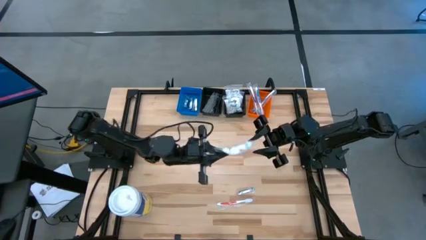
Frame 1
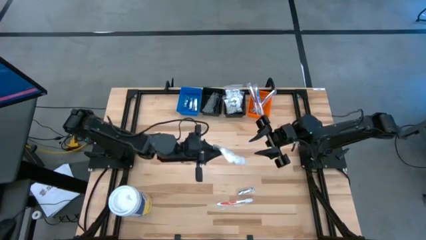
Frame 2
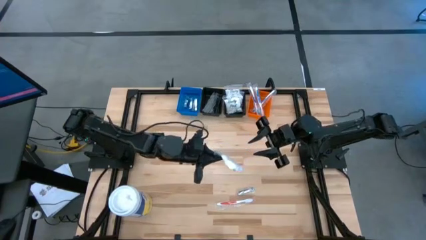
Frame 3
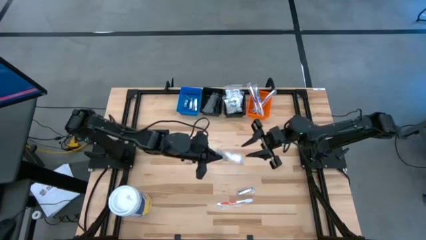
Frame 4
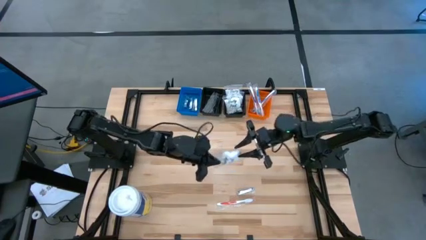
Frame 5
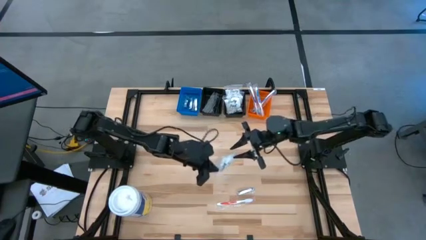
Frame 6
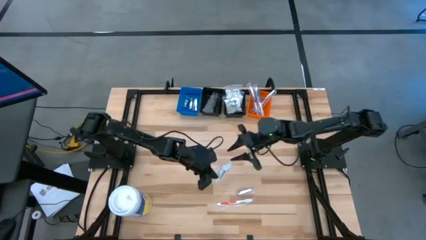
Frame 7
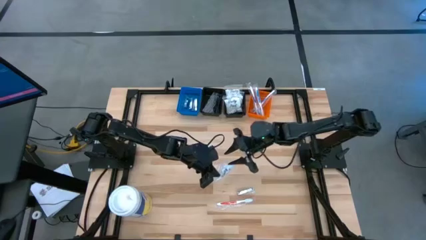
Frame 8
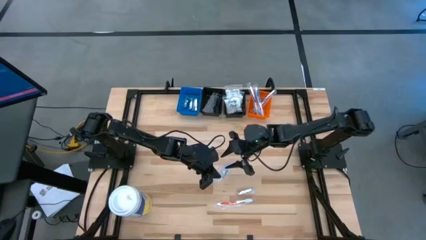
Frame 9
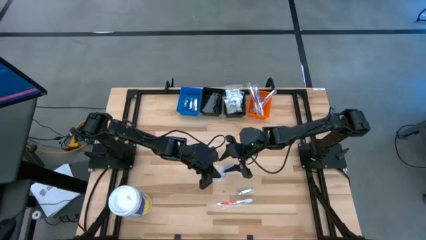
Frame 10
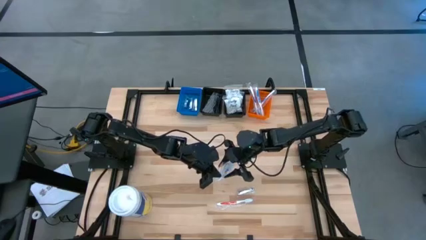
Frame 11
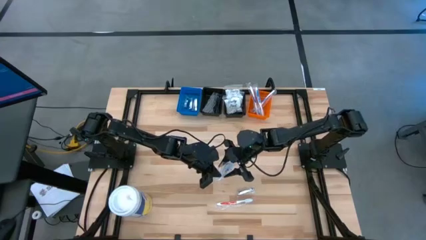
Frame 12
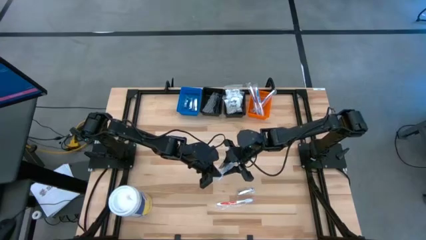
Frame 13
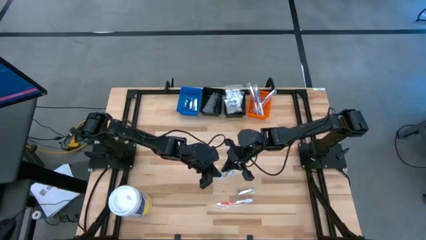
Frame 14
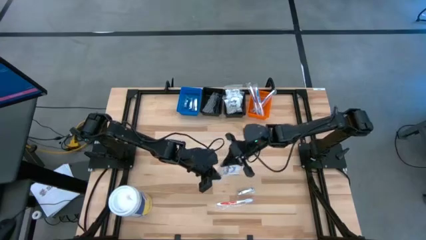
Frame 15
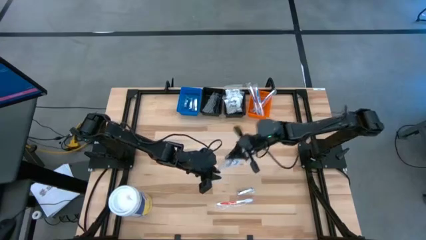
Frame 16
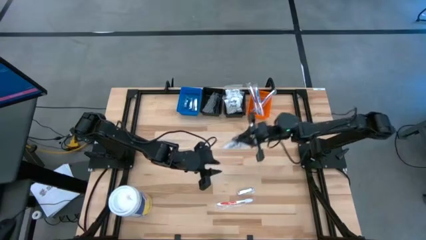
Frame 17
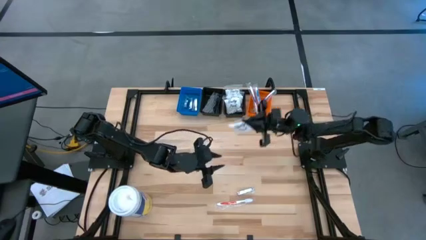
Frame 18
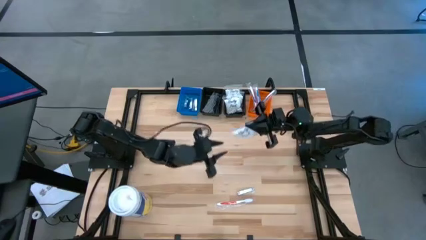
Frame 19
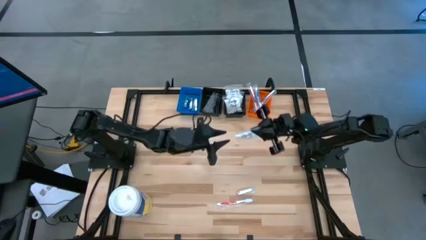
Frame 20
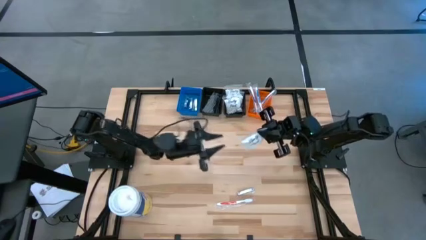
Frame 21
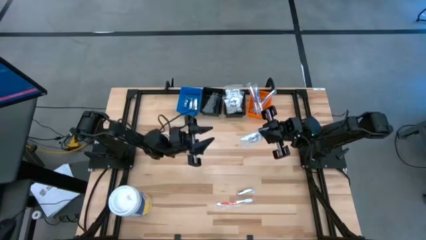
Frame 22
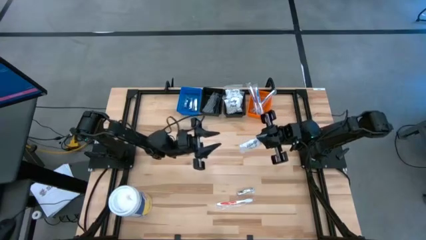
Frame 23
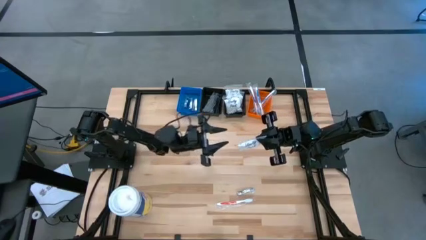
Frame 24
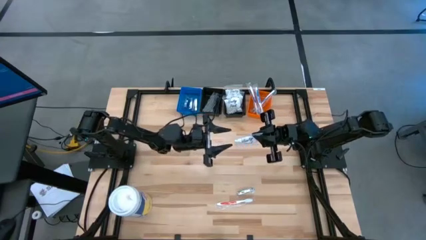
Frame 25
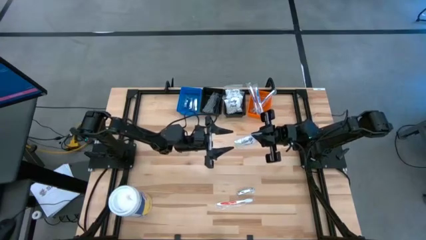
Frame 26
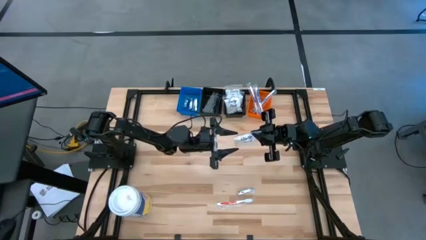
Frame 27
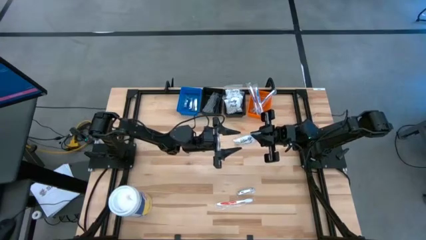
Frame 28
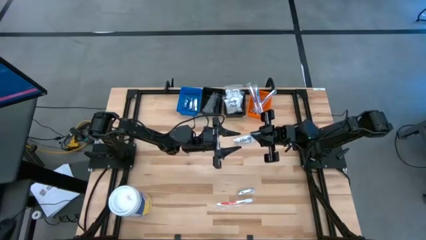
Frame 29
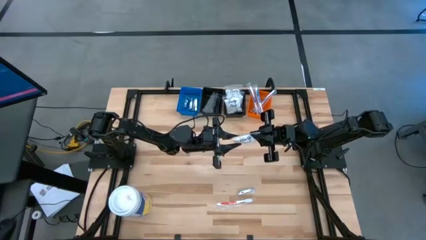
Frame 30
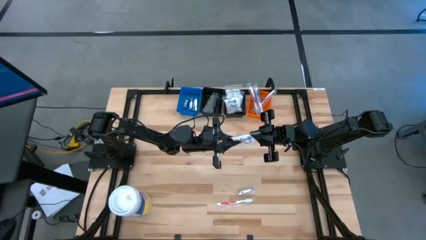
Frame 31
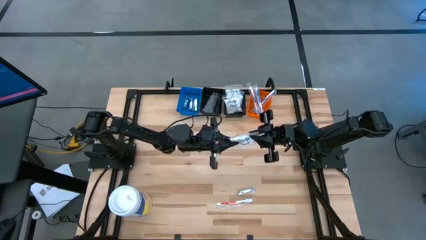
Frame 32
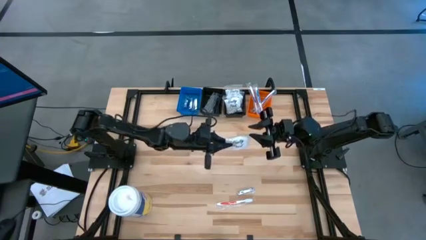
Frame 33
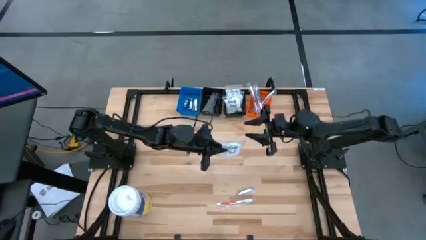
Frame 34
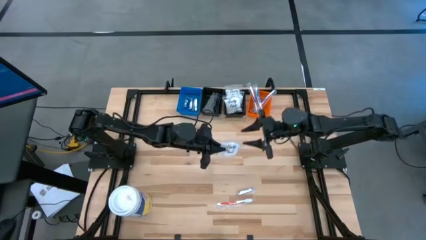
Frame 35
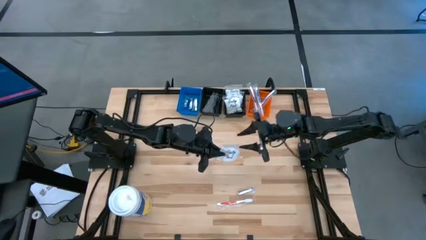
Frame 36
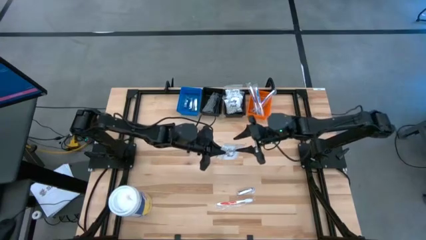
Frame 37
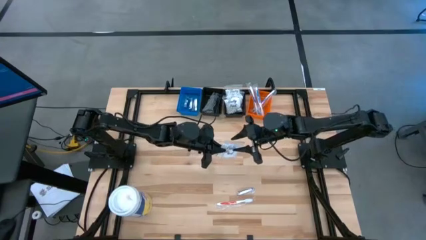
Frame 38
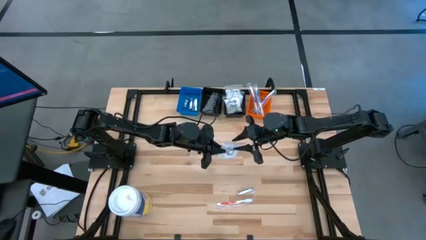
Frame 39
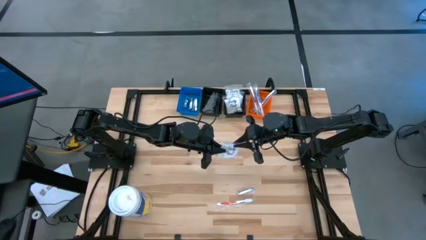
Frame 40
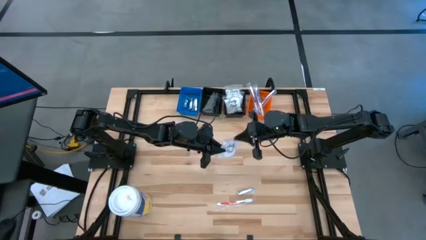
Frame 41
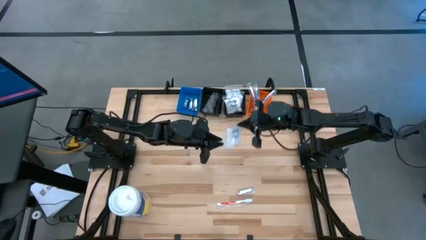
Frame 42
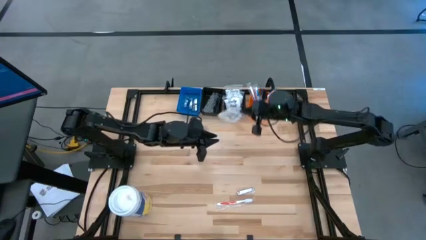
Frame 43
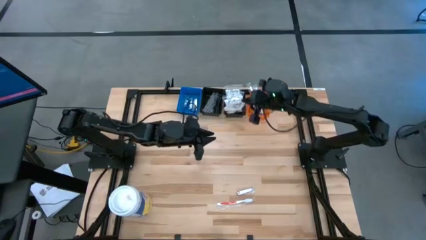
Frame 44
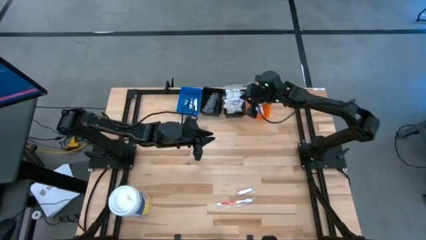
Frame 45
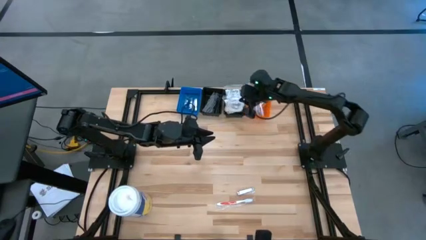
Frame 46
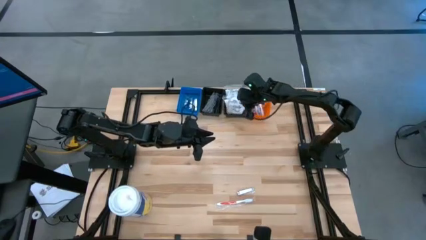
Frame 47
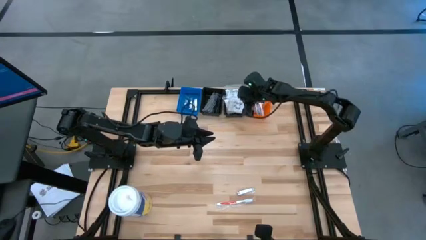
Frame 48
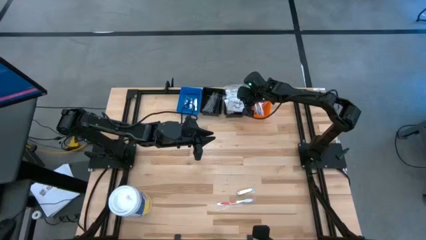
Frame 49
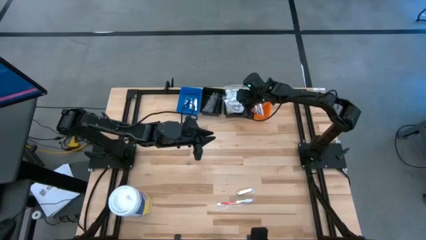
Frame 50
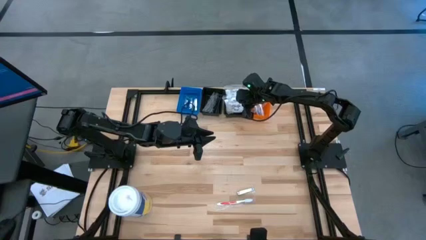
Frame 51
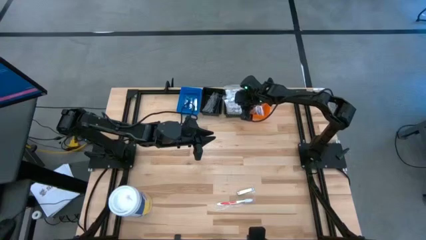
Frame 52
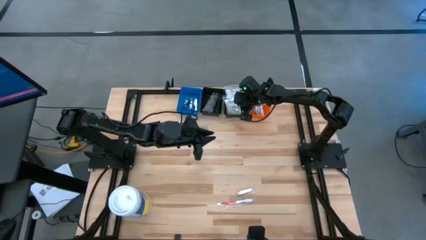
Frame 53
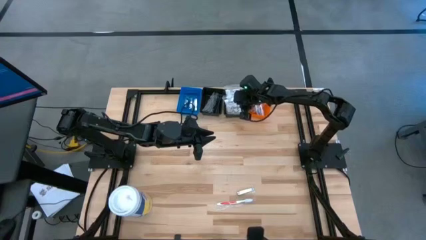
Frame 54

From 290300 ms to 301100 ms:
Task: Pick & Place Travel size toiletries
Put the white vanity pack into the right black bin

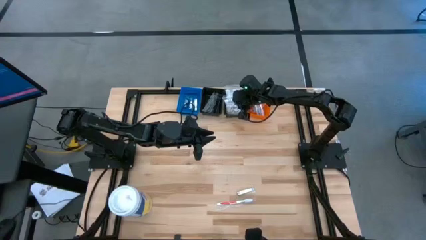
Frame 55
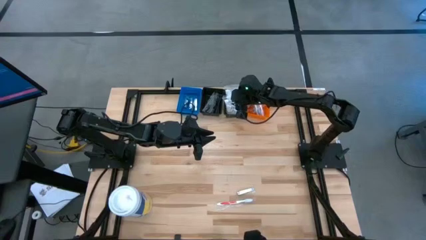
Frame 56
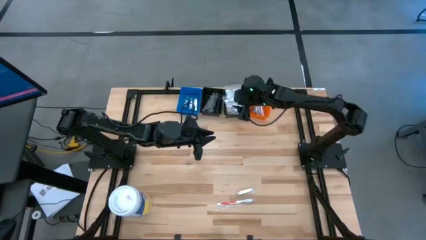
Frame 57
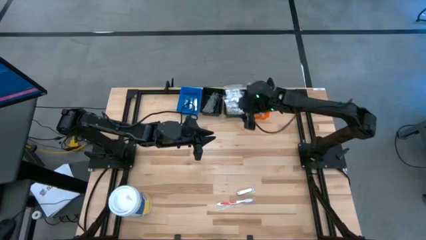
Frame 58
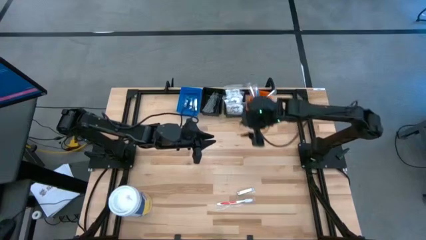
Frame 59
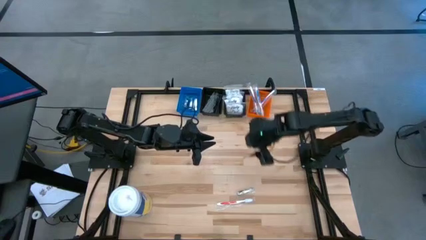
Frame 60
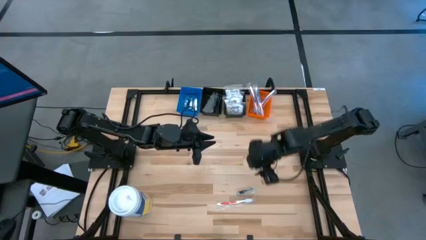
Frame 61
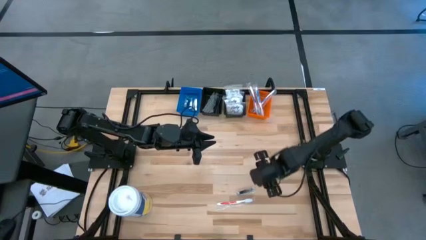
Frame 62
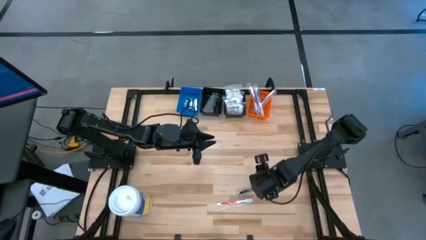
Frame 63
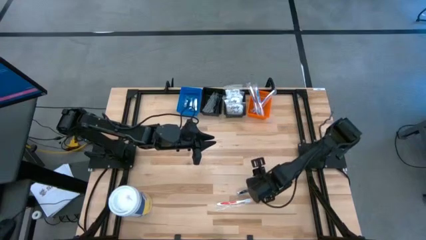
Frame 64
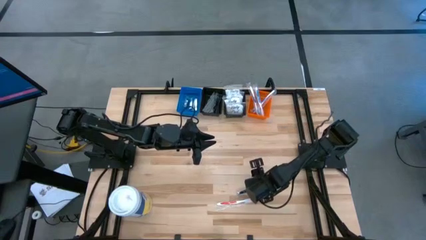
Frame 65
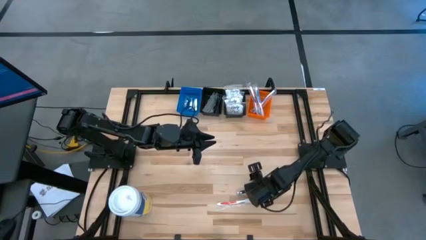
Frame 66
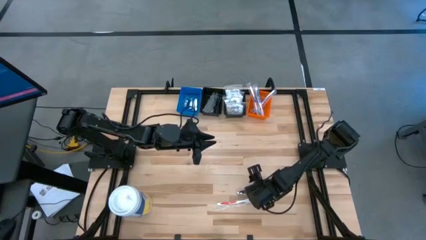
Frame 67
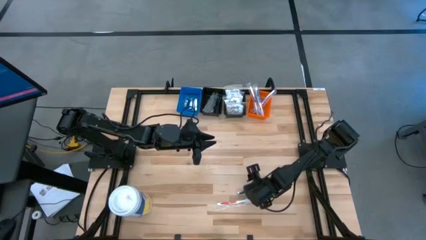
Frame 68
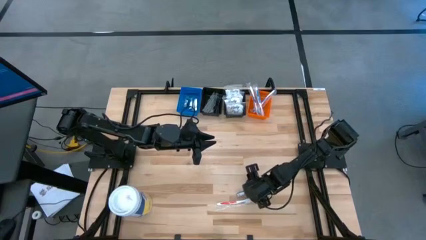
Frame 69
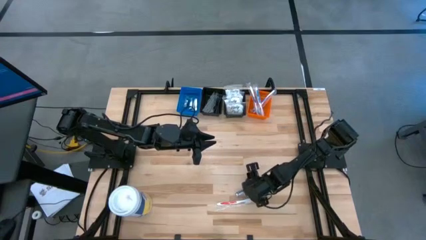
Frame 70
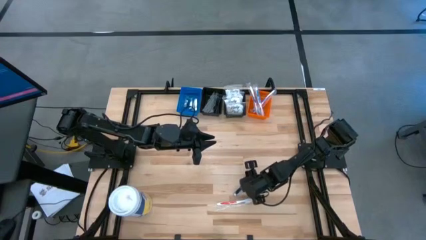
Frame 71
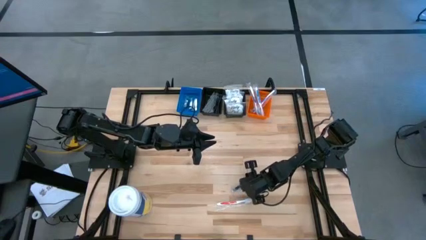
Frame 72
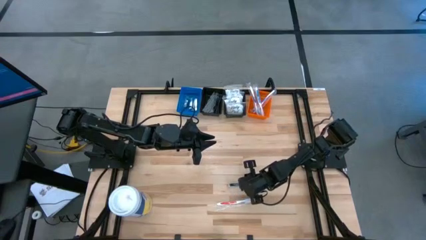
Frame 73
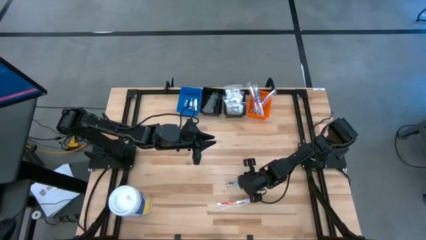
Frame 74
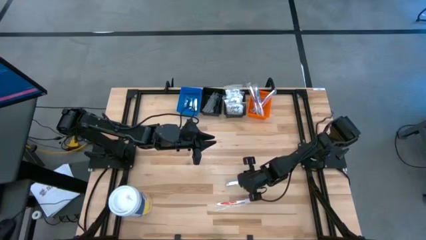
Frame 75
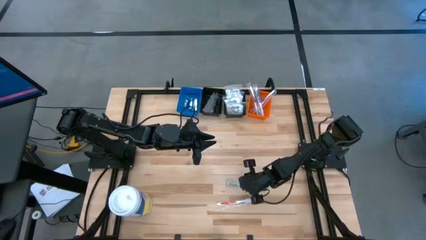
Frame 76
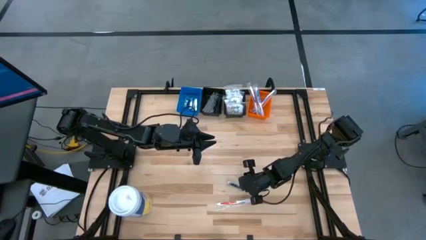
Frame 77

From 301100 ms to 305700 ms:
Put the silver nail cutter into the blue bin

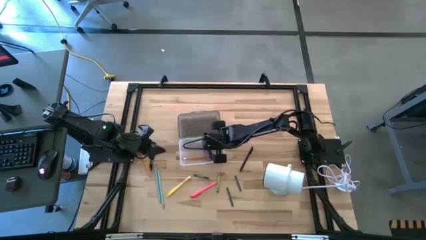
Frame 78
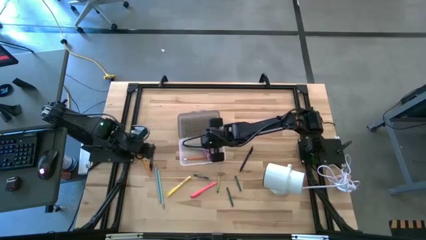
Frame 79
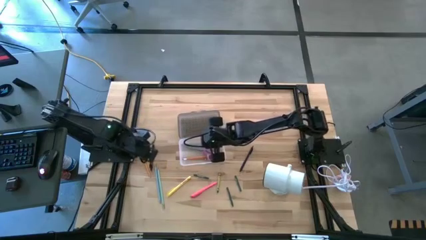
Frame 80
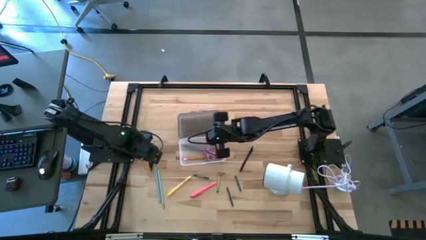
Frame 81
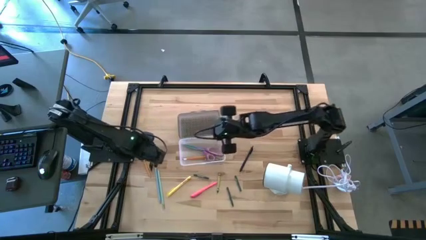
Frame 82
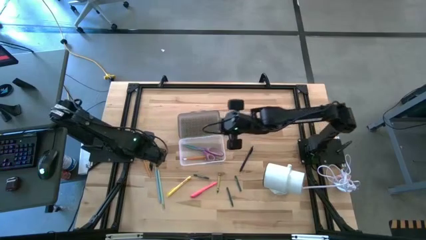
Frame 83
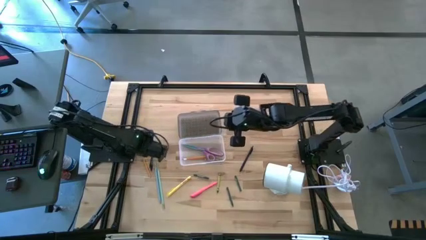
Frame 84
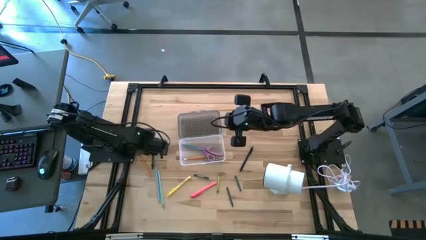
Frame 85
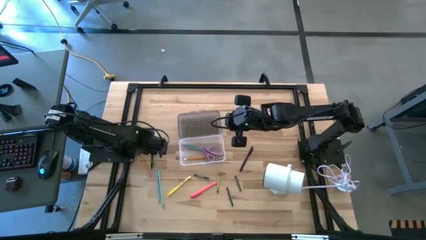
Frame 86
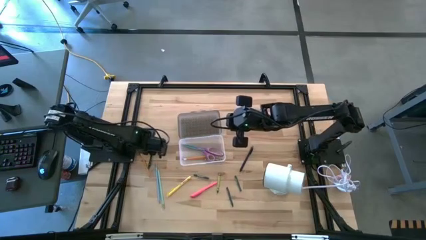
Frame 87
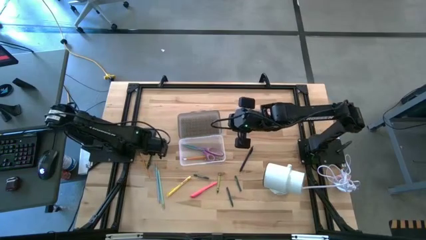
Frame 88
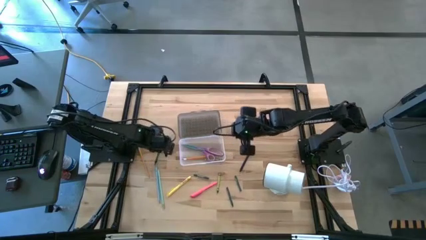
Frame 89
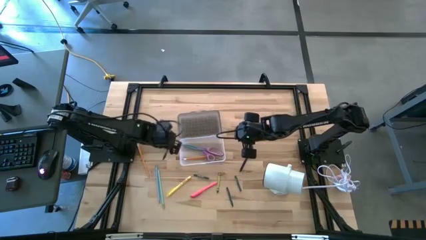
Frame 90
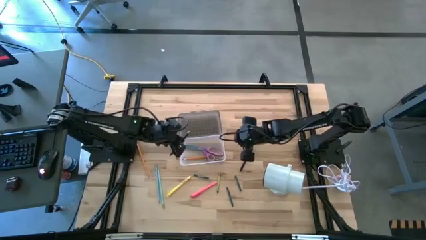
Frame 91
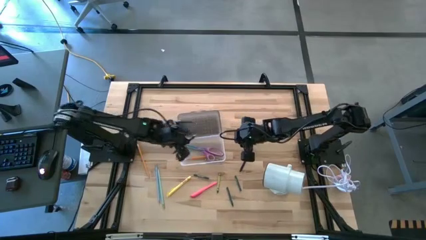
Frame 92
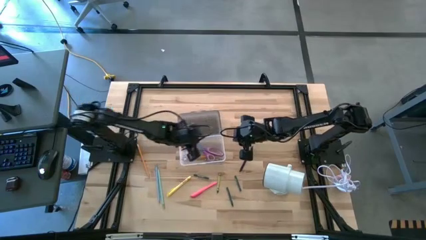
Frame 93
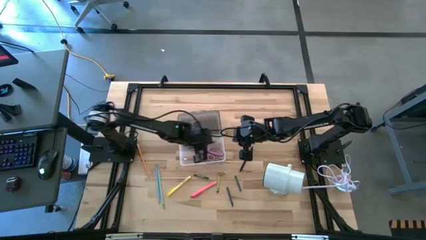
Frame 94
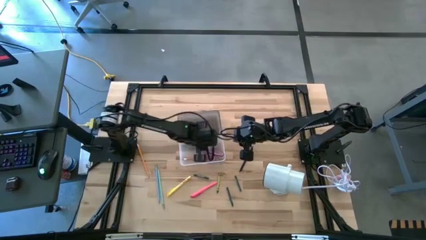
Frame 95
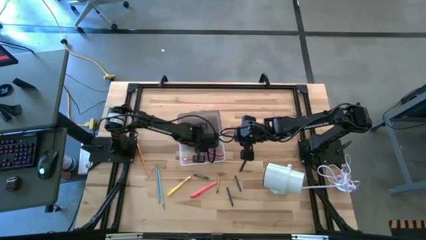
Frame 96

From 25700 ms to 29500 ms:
Task: Pick & place school supplies into a supply box
Put the black pen into the gray supply box
